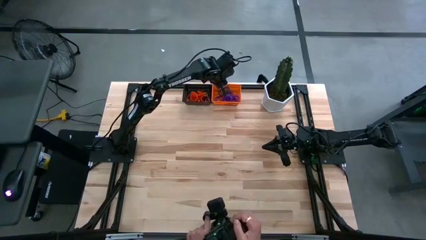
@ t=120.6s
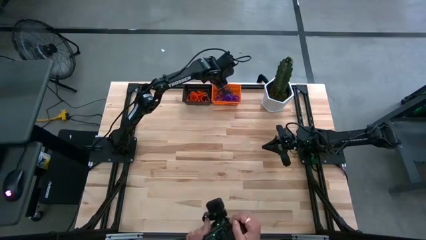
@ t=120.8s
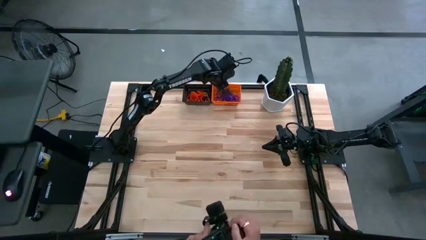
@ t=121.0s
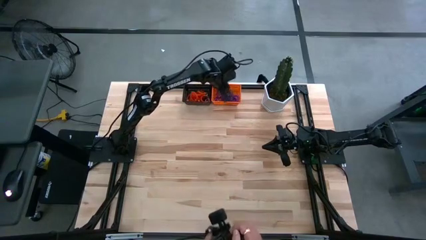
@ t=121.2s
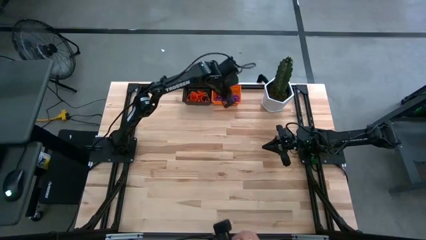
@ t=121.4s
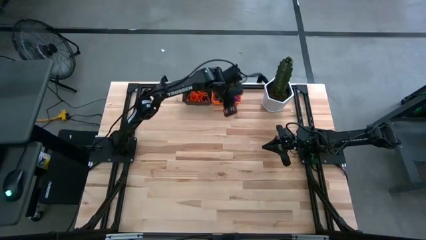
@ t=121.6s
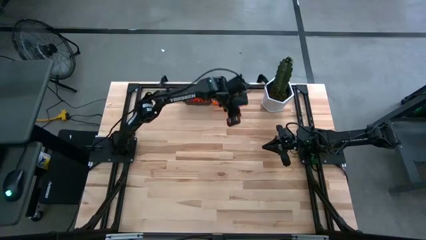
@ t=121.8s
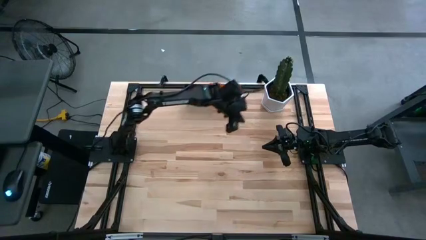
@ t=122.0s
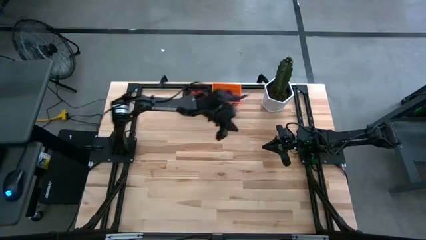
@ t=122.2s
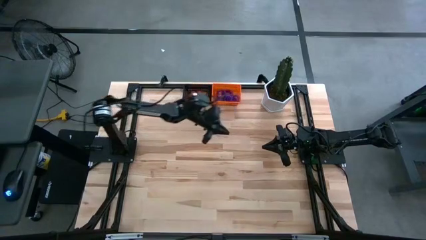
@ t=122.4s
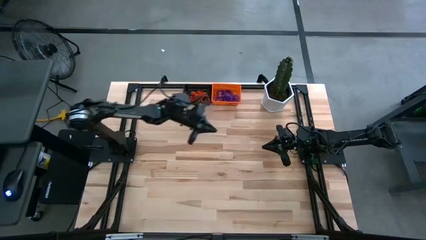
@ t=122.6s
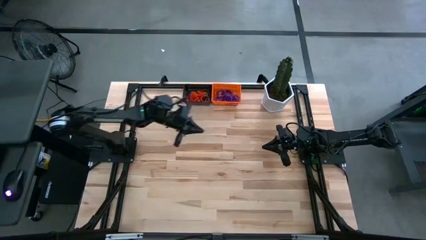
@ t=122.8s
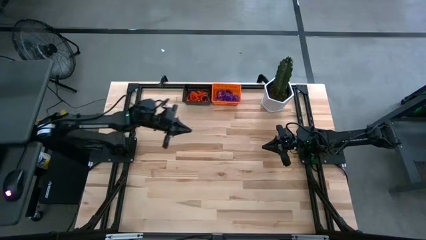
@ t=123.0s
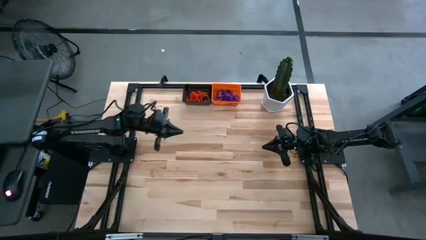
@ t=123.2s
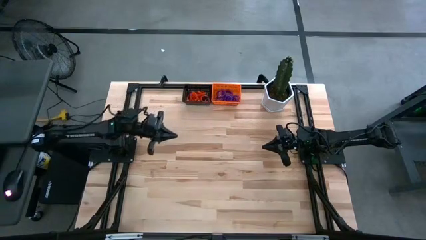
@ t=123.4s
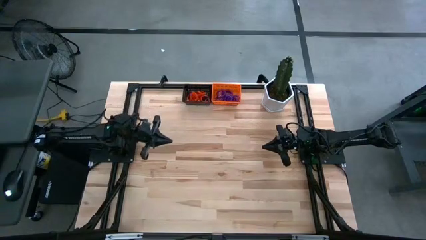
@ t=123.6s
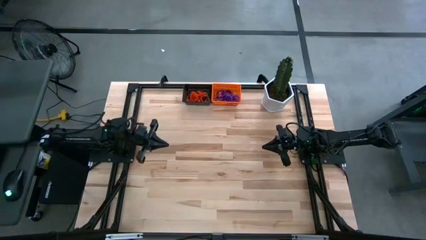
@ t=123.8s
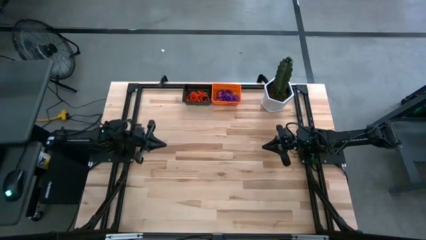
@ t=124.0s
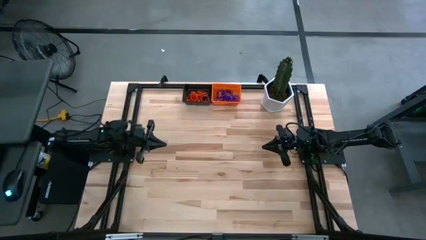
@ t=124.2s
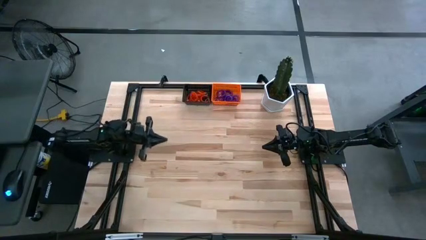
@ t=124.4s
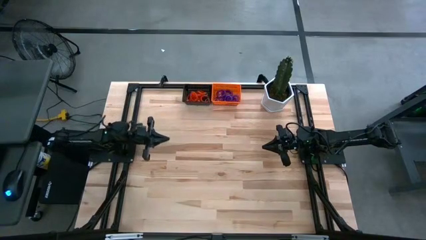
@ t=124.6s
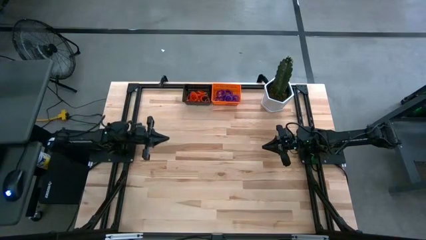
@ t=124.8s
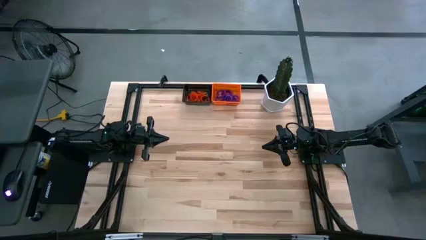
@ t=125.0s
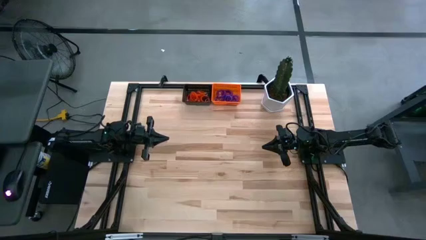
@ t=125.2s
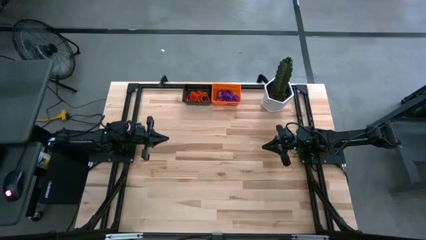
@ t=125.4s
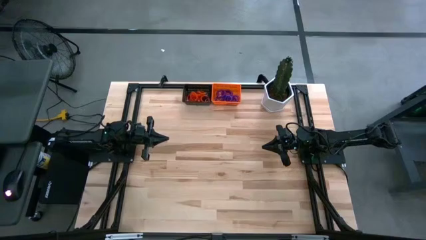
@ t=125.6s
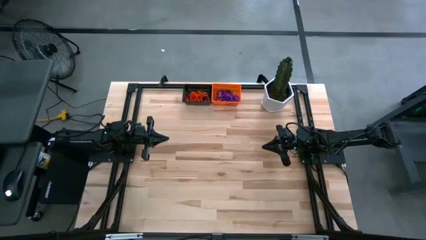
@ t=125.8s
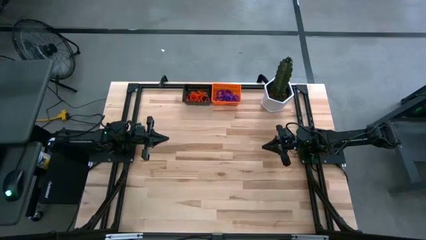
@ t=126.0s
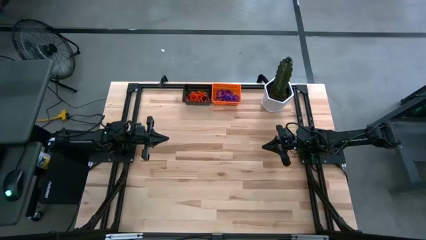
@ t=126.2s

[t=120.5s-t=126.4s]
Task: Sort spring keychains into baskets
Return to Home Position

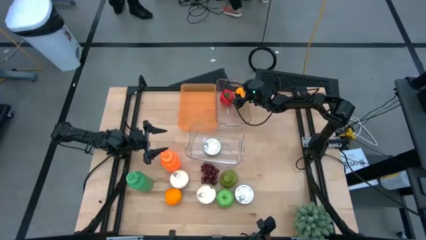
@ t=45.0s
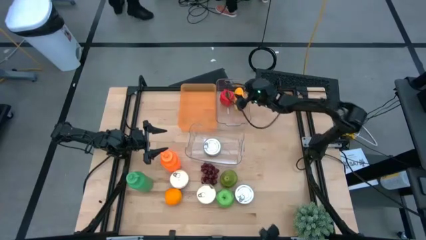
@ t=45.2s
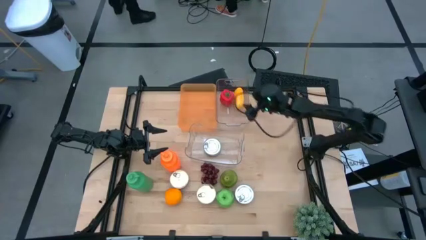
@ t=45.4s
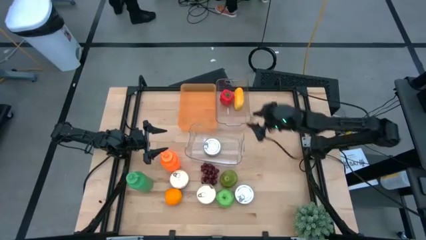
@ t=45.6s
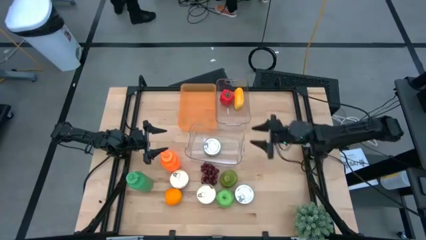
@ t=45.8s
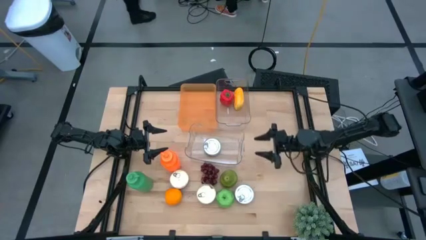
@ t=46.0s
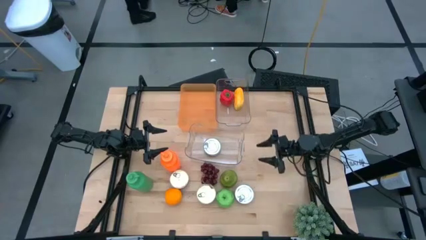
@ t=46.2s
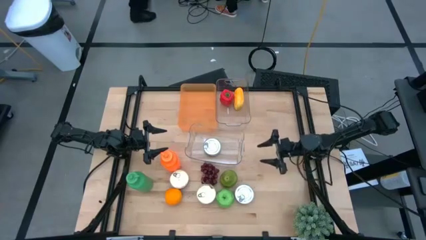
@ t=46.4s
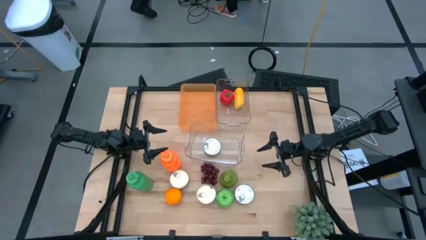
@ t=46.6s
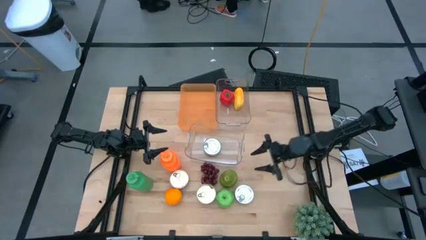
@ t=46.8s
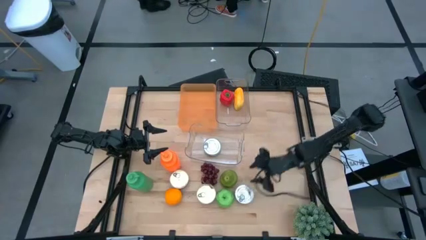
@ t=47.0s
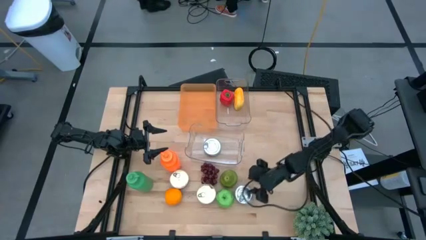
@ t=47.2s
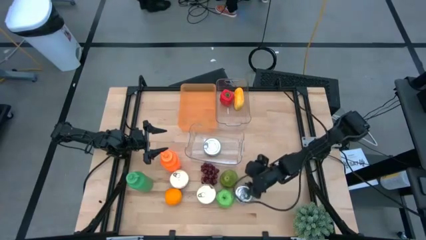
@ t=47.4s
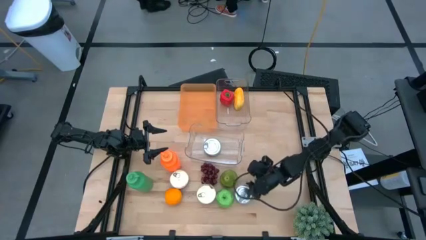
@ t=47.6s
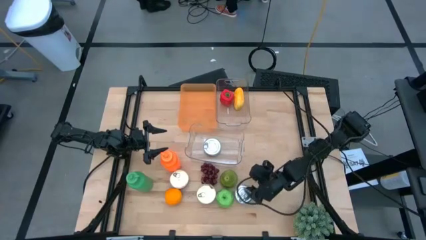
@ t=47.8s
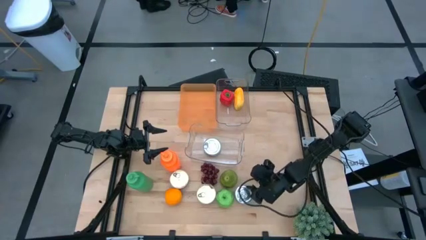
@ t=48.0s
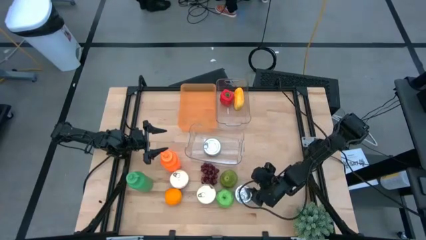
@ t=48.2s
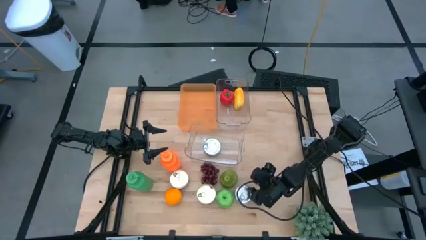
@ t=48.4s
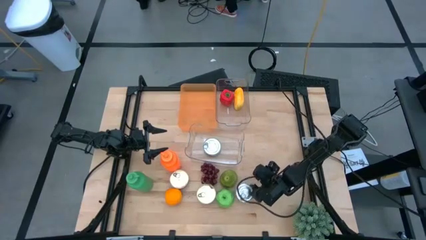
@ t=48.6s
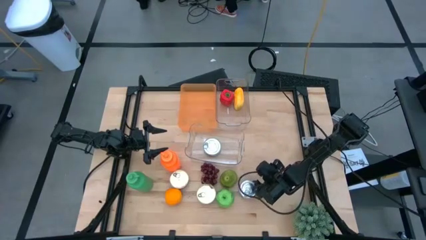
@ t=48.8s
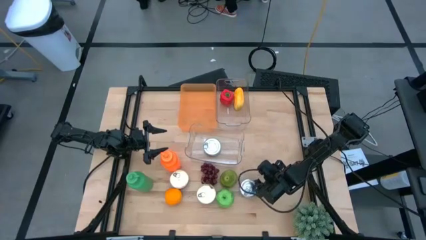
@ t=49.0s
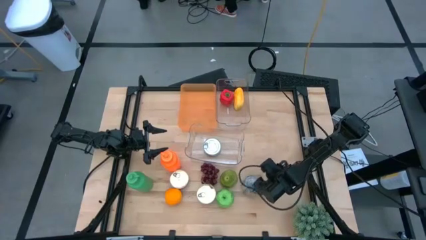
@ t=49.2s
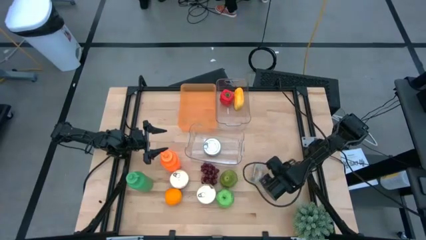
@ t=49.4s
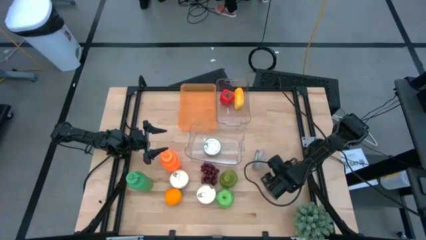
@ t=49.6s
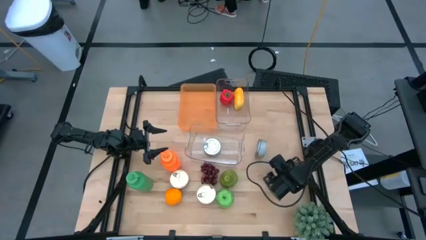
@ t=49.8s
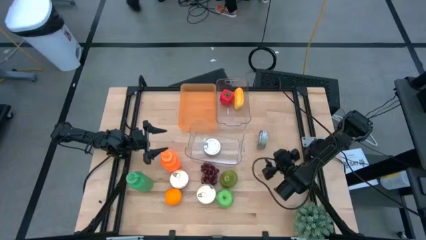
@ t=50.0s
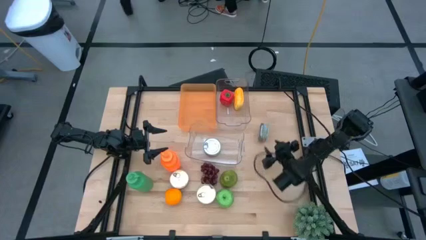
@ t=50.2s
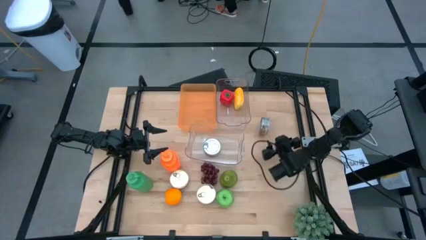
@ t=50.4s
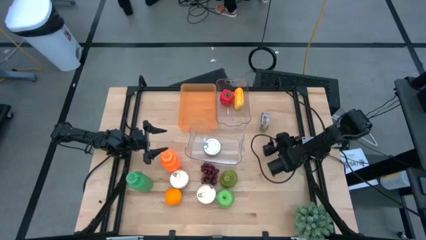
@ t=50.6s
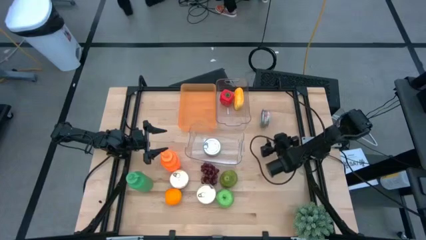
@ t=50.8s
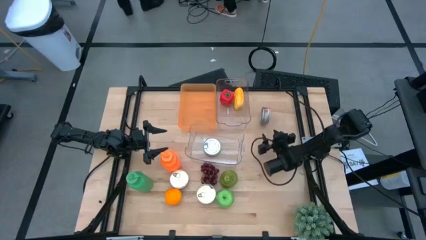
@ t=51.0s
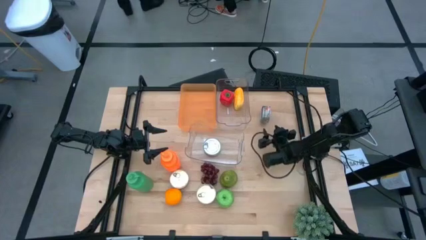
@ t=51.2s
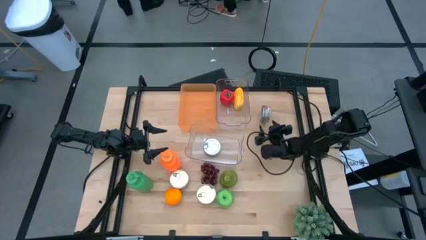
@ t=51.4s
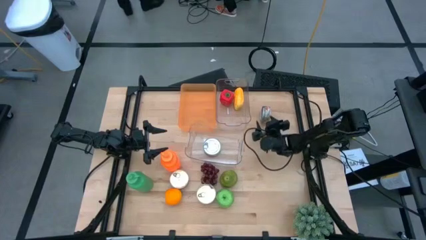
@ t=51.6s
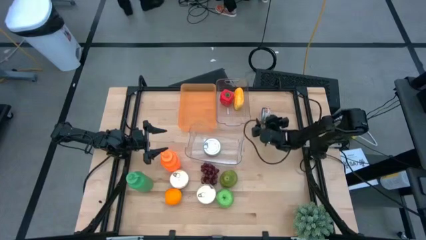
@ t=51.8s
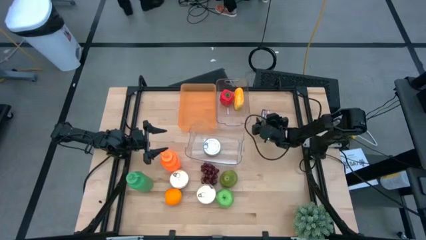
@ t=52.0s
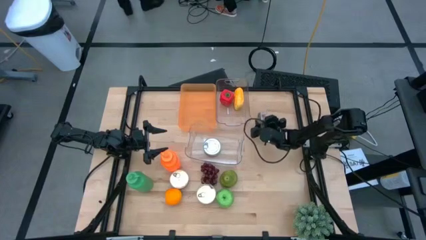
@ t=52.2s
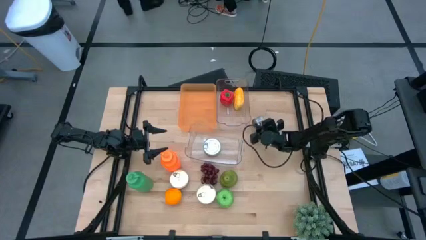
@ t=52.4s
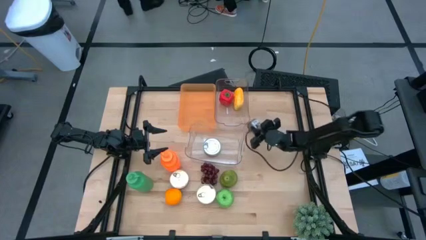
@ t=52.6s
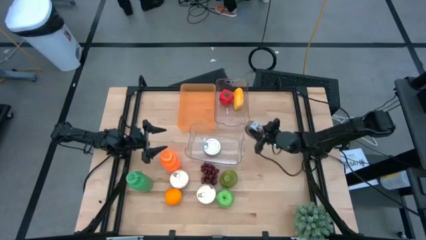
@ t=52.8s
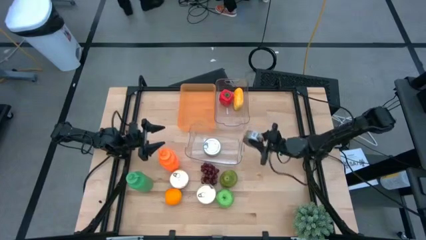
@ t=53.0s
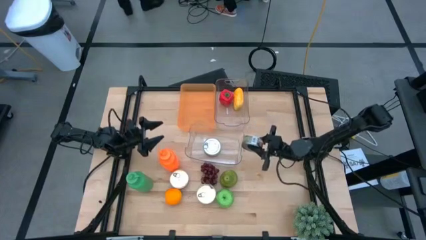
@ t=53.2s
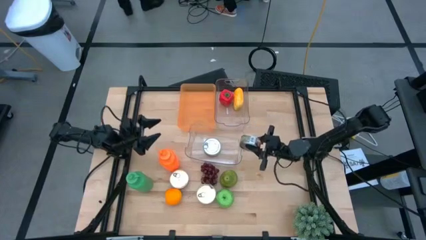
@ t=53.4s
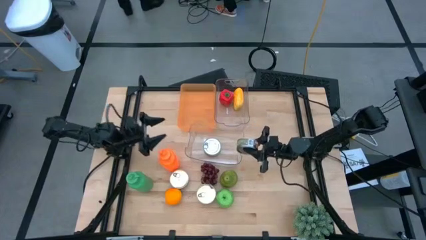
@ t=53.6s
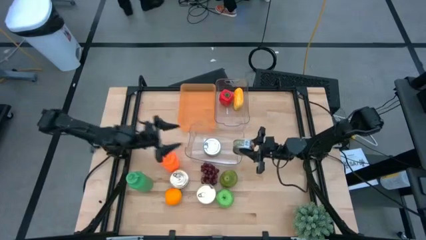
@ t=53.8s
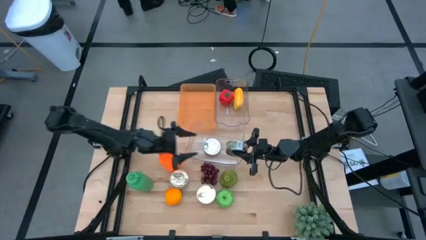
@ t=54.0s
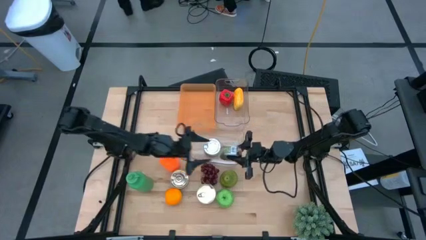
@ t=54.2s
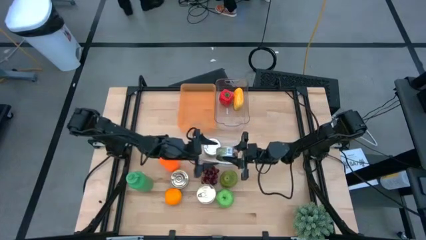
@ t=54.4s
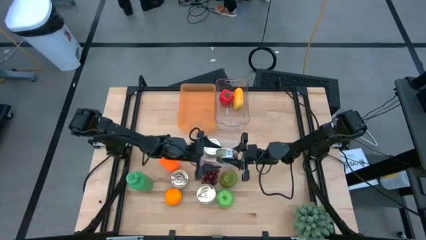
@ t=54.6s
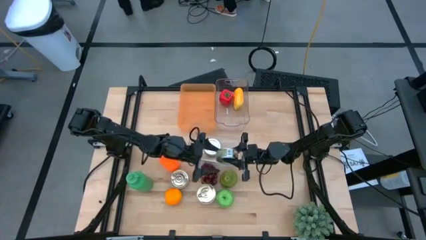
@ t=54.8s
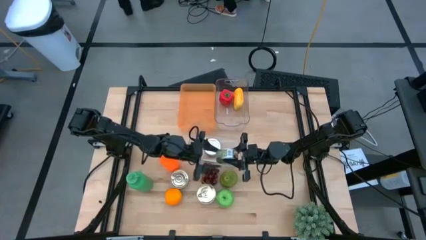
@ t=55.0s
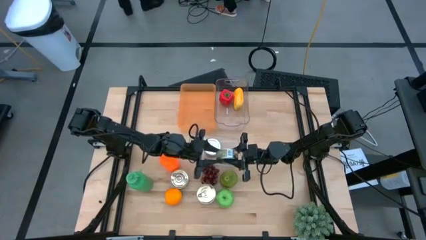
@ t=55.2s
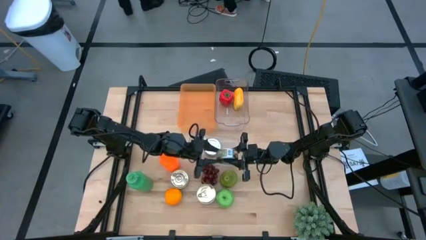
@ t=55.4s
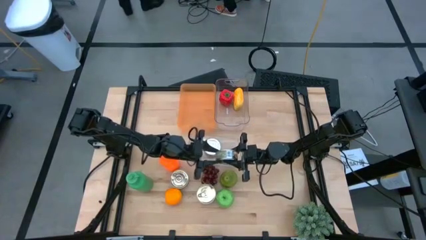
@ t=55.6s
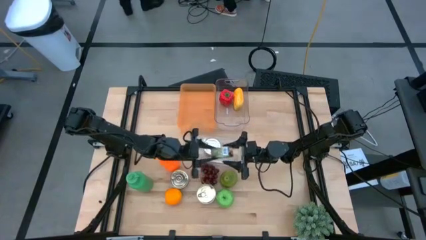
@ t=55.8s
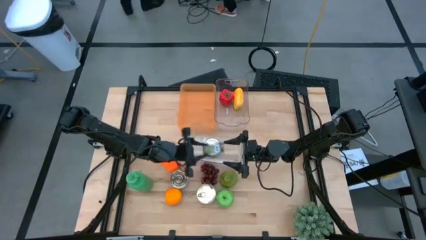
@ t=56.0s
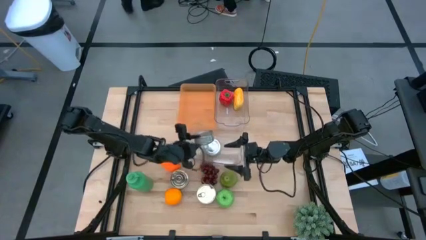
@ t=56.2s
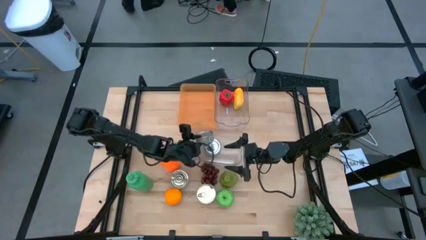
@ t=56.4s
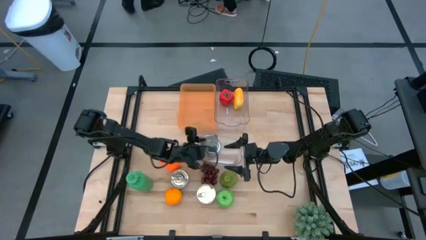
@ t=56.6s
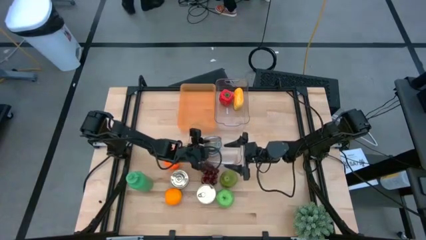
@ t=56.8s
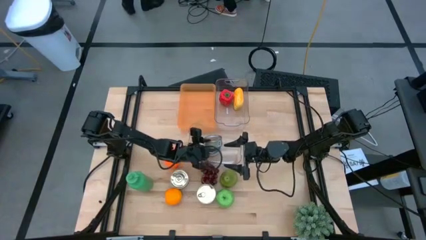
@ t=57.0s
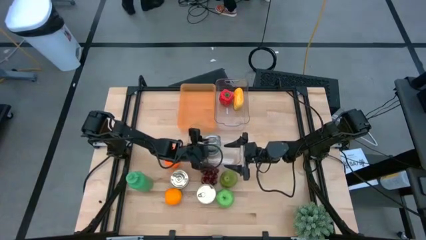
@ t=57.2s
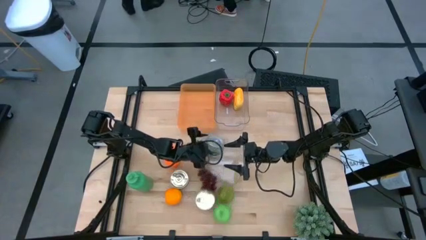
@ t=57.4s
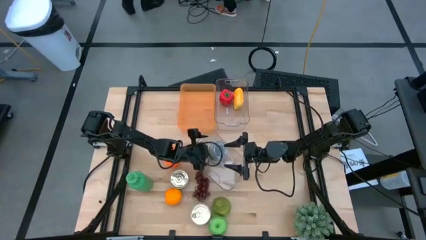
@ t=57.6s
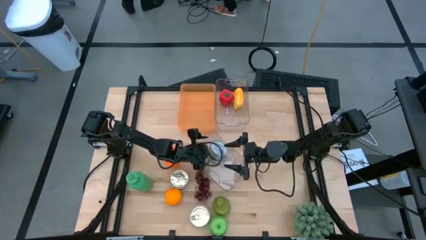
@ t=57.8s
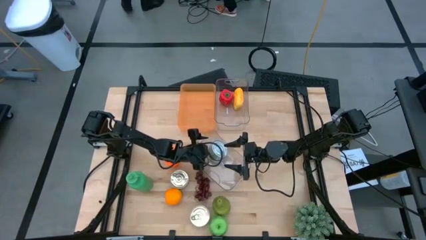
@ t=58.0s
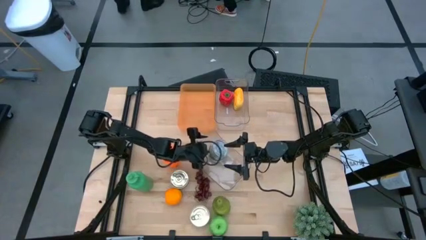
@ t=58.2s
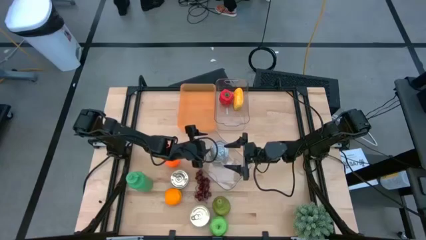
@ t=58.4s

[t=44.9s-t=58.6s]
Task: Pick & Place Food Item
Put the green tuna can into the bottom transparent bin
